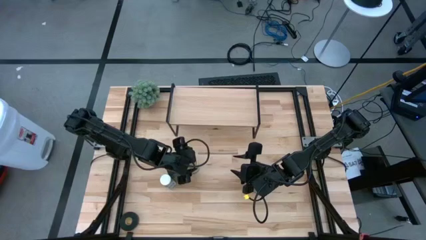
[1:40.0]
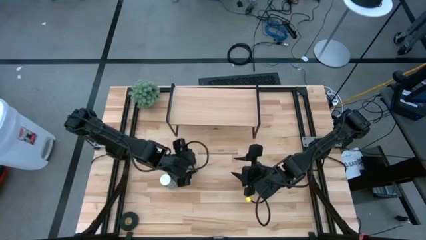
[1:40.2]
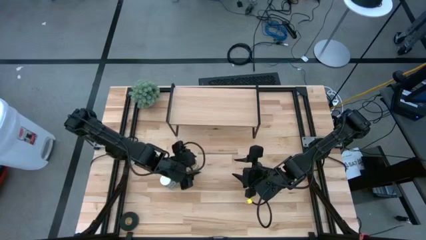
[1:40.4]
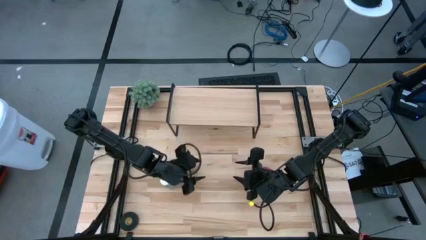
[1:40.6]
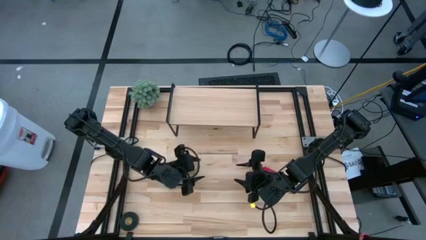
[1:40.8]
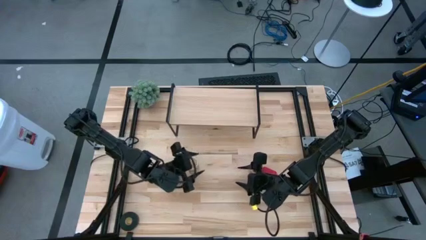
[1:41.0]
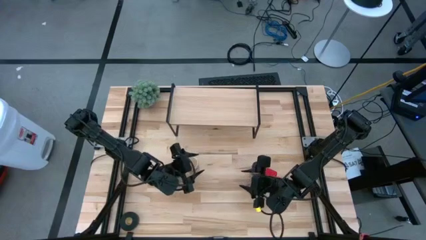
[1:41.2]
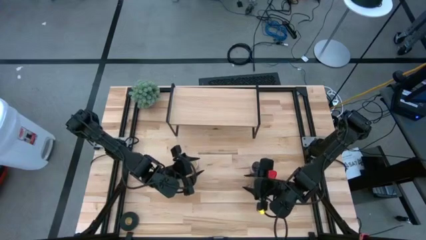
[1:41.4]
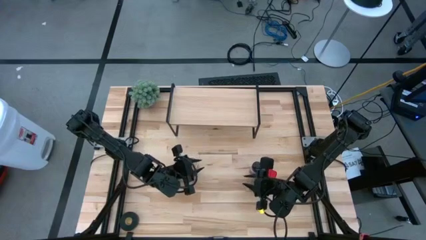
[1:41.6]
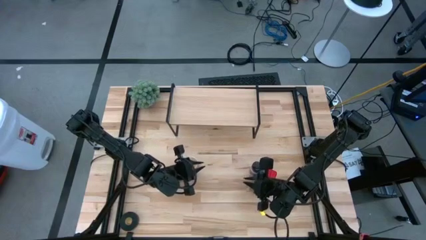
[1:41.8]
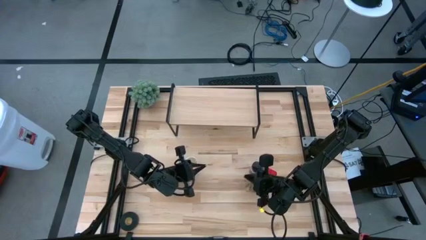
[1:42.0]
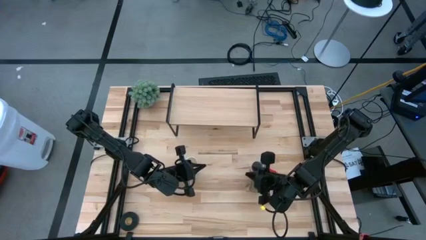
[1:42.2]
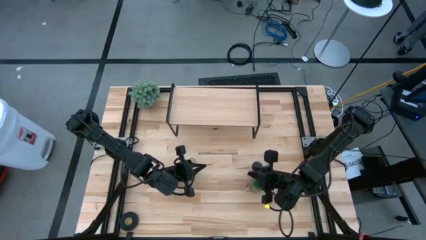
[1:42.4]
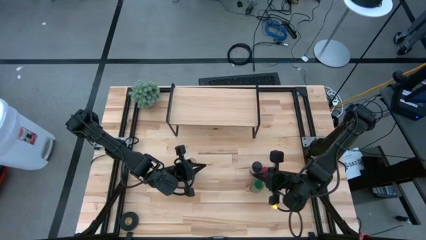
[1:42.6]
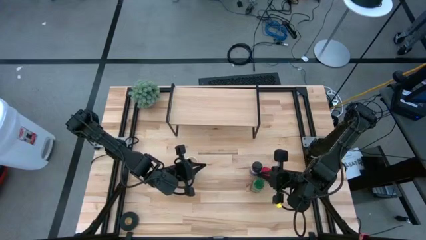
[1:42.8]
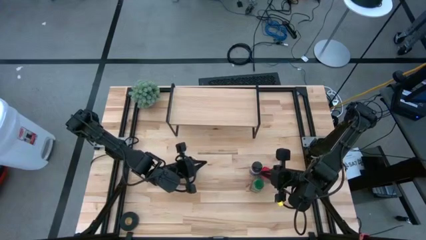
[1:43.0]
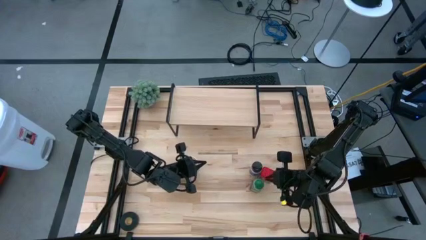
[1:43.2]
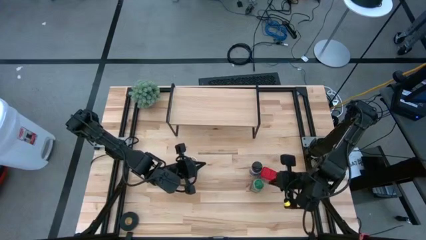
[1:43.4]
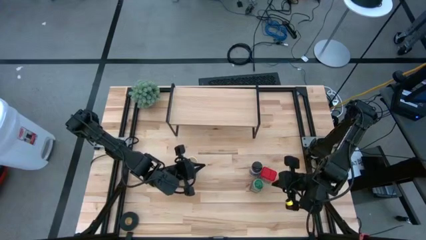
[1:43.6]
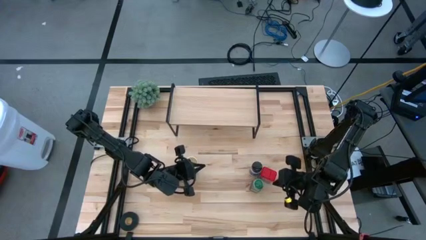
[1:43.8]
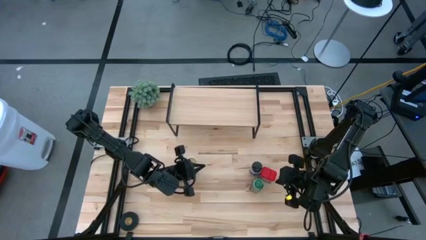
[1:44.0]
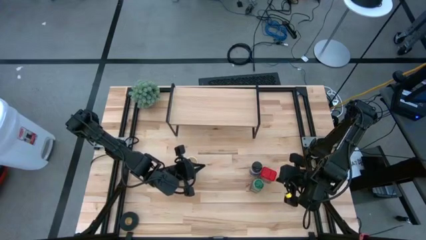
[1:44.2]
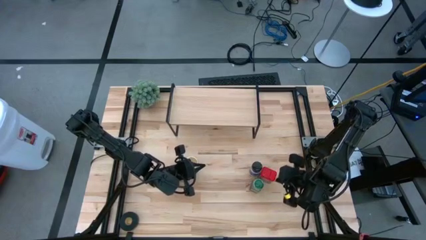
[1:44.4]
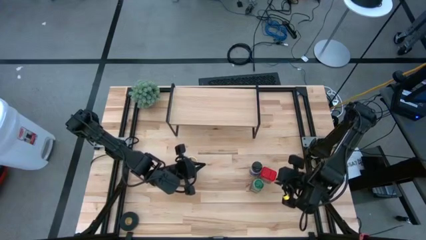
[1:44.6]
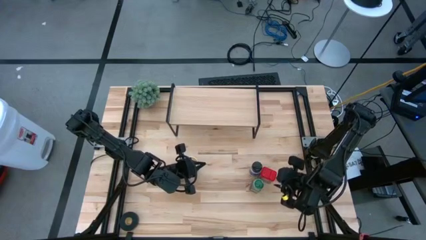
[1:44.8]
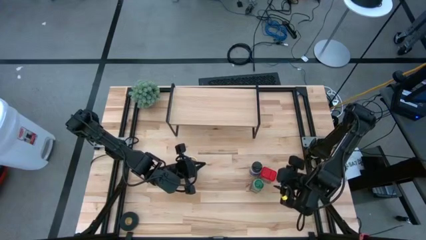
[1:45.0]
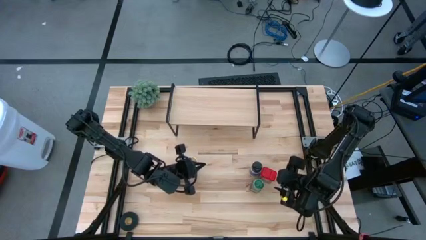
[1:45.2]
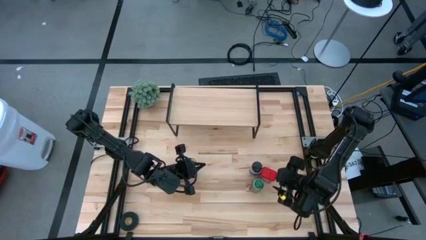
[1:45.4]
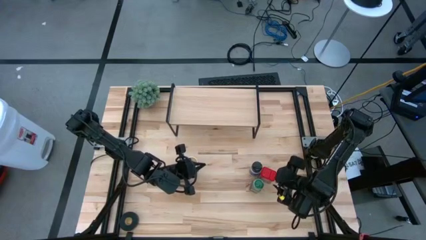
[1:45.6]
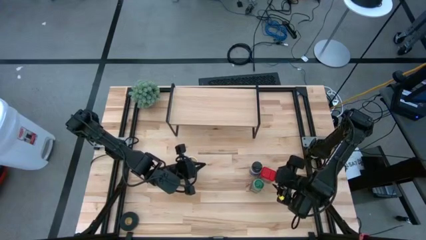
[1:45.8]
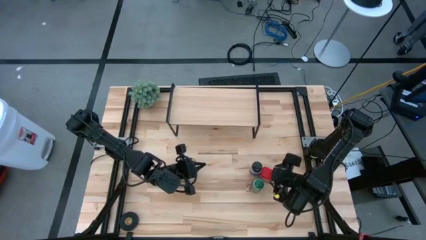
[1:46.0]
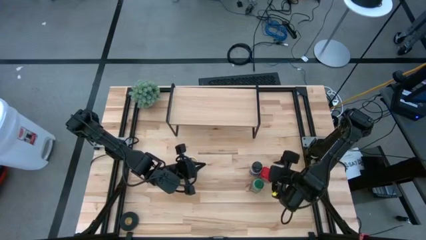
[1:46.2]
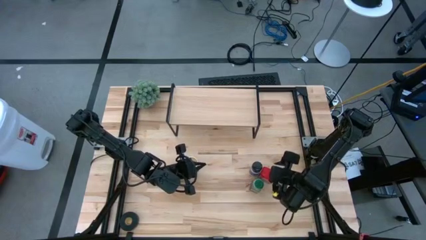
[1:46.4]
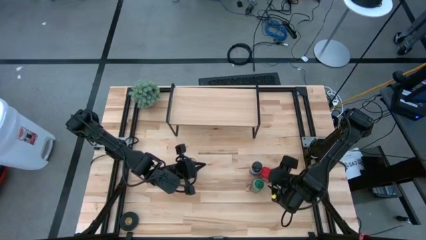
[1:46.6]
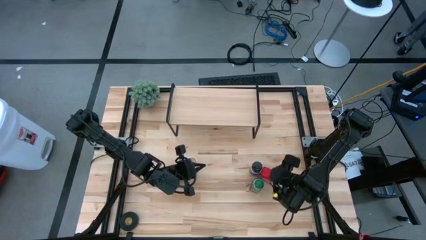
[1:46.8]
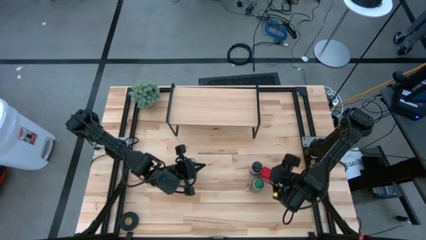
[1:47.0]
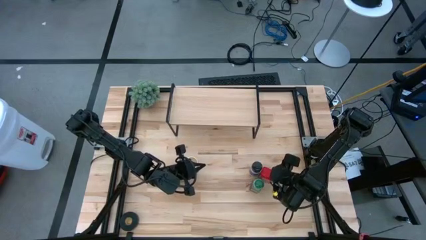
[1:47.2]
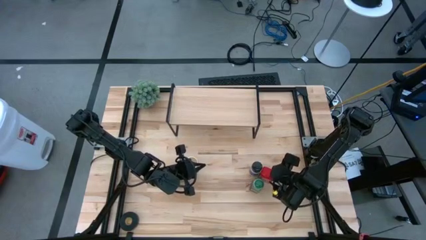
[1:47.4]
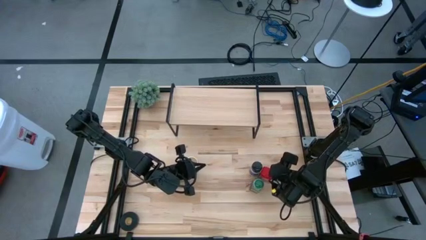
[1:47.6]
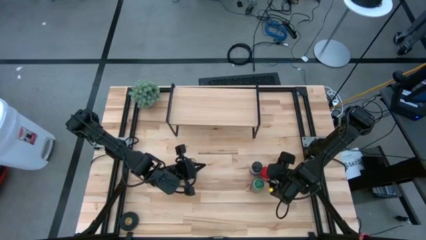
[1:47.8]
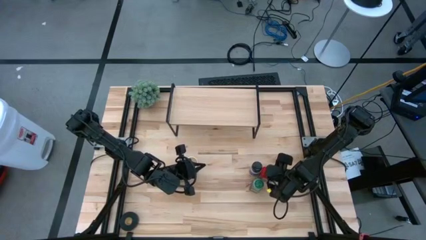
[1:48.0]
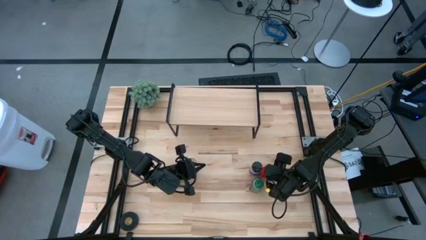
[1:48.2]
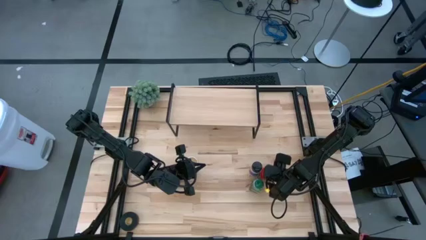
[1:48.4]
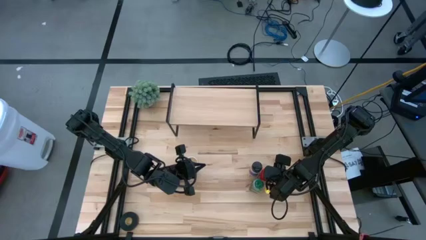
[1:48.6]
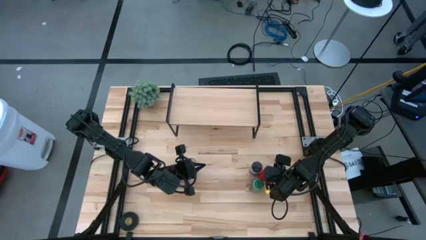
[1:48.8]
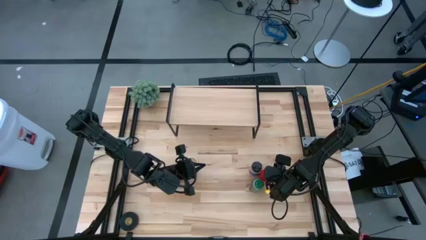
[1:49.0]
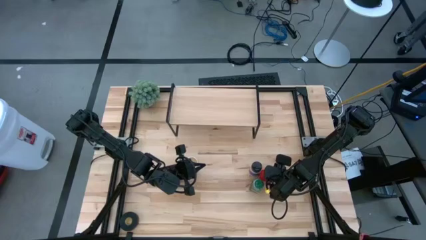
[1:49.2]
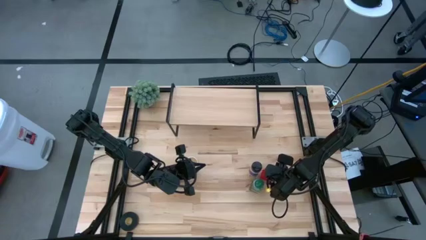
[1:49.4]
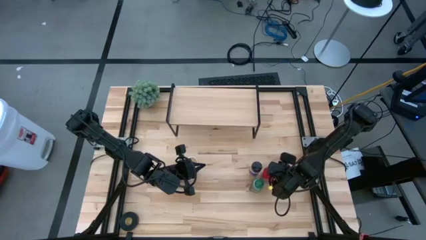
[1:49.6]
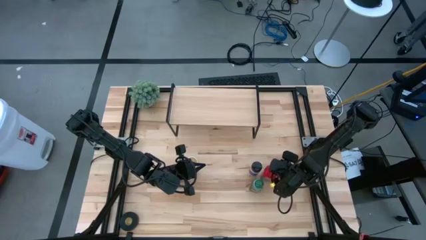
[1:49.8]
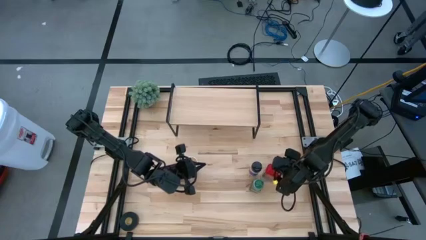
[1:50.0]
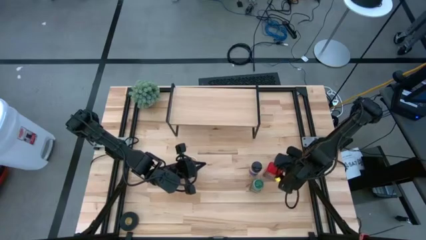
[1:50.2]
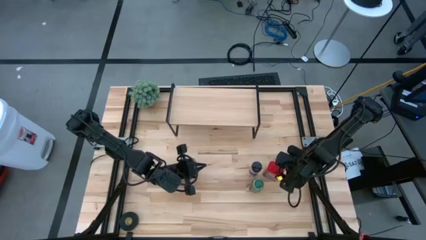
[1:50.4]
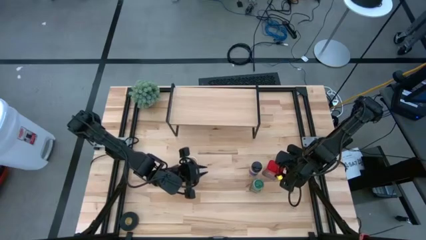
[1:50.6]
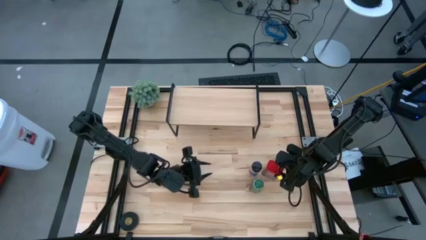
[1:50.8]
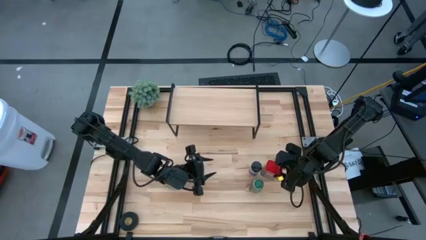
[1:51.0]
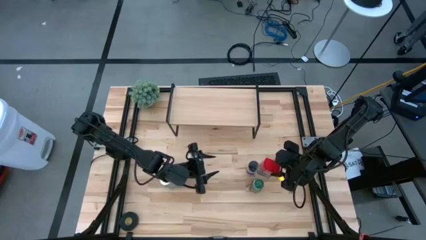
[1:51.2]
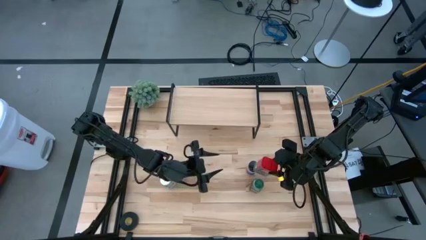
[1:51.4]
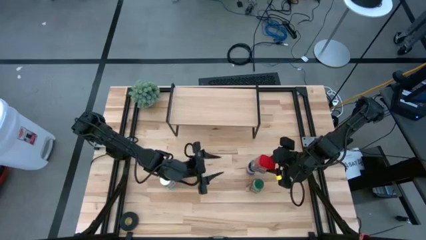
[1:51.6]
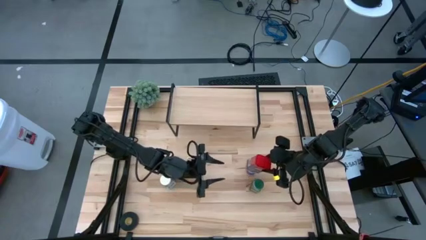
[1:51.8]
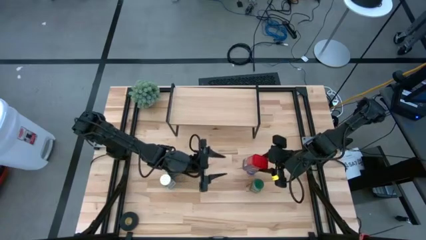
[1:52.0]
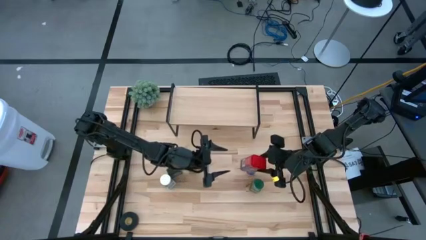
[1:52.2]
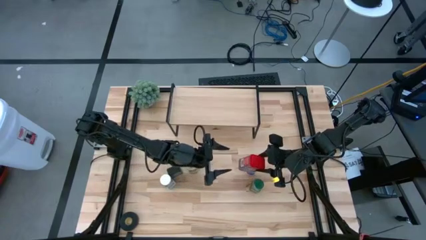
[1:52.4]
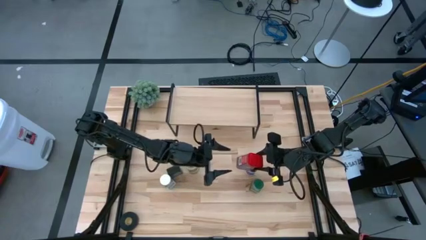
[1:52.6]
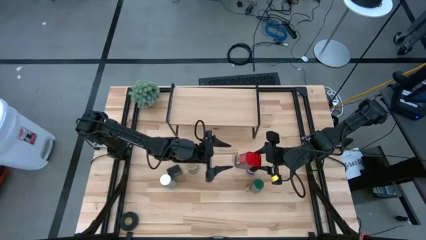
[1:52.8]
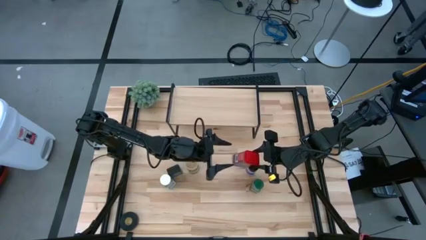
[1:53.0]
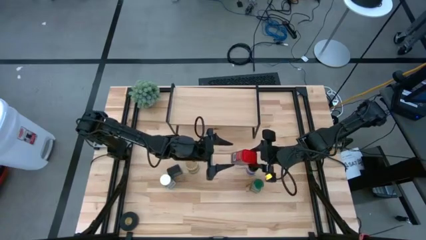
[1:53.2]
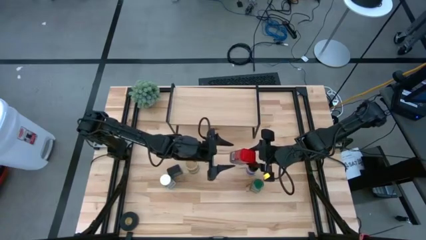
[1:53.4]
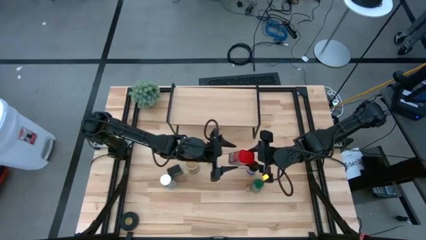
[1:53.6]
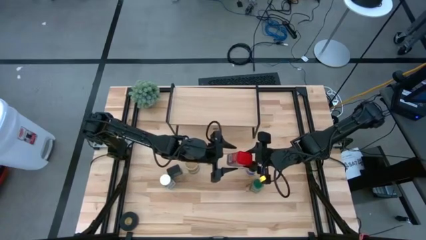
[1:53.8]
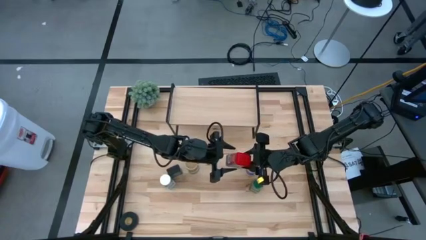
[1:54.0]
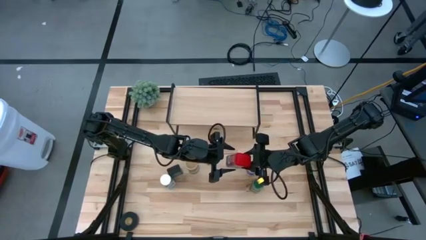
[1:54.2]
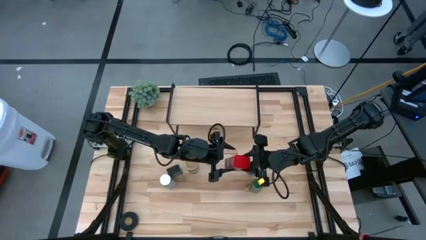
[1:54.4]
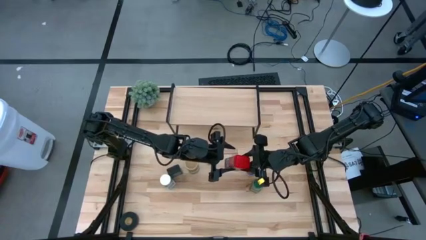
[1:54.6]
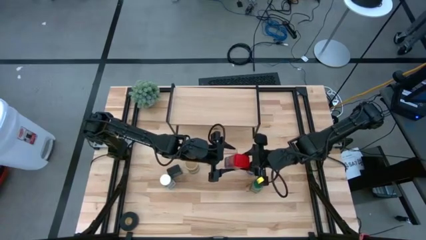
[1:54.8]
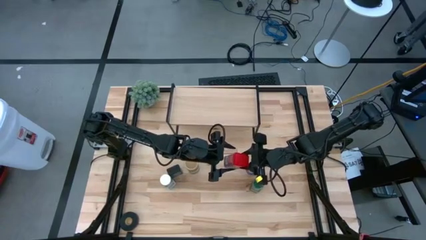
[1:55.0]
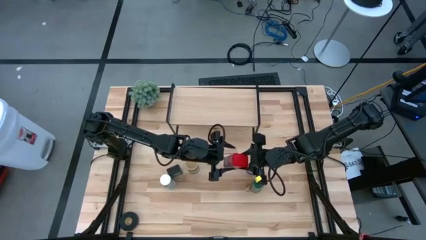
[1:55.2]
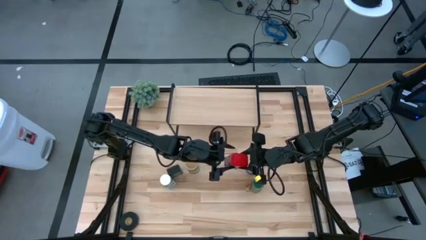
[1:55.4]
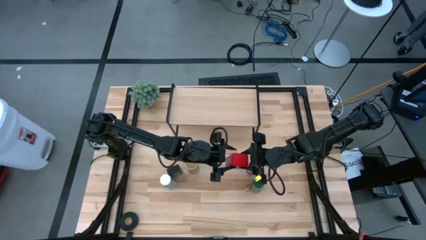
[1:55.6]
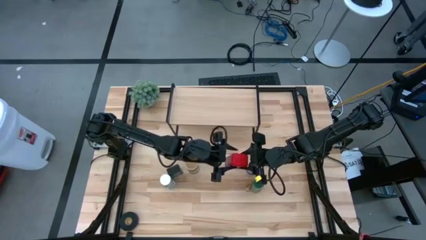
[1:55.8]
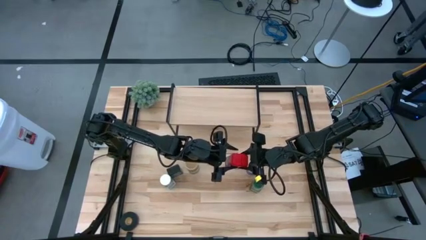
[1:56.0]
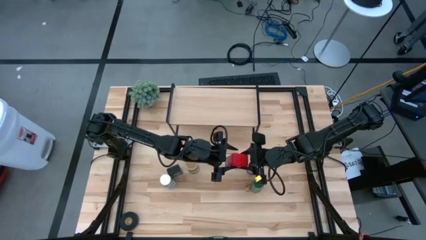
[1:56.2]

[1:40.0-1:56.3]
Task: Shelf spices
Put the red seasoning can on the shelf
